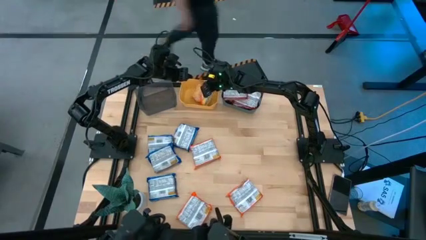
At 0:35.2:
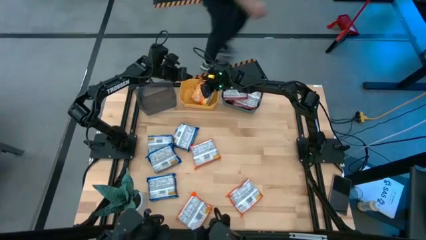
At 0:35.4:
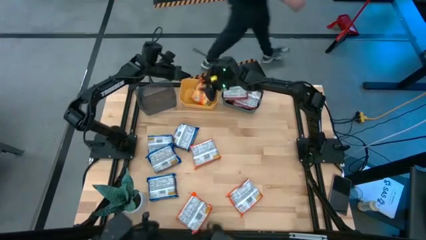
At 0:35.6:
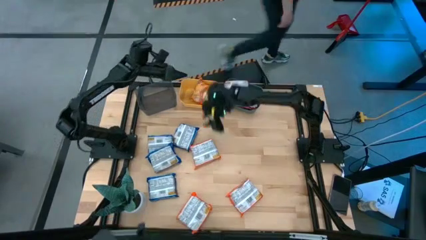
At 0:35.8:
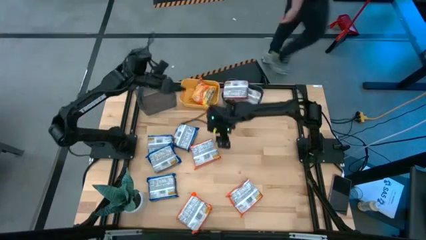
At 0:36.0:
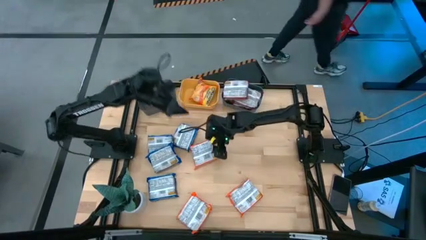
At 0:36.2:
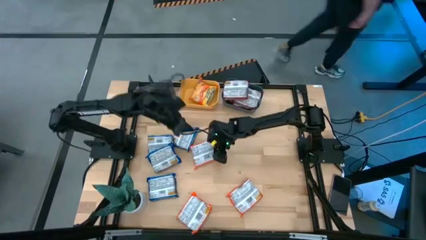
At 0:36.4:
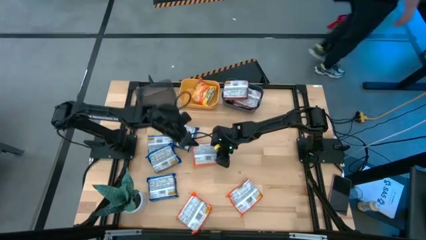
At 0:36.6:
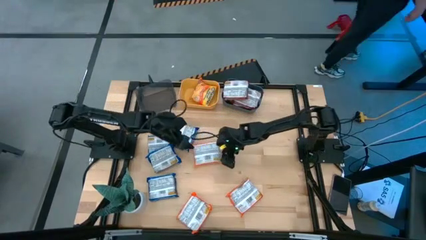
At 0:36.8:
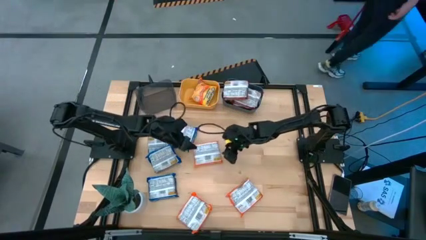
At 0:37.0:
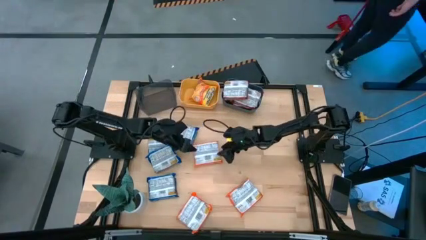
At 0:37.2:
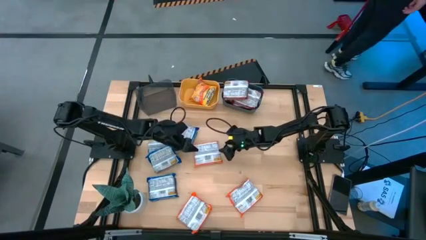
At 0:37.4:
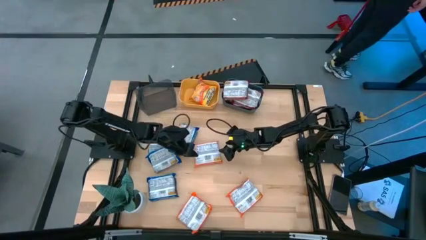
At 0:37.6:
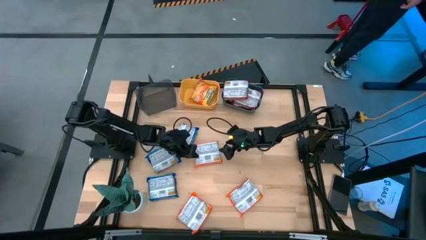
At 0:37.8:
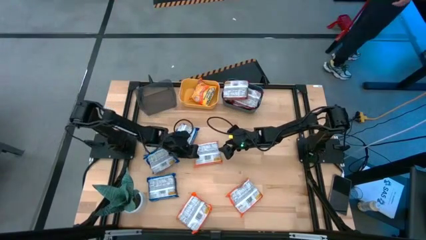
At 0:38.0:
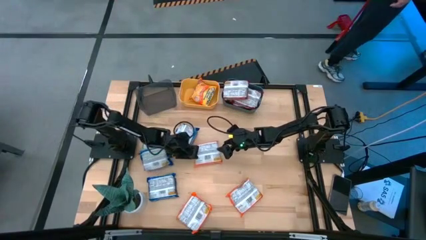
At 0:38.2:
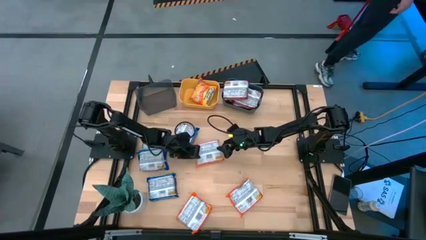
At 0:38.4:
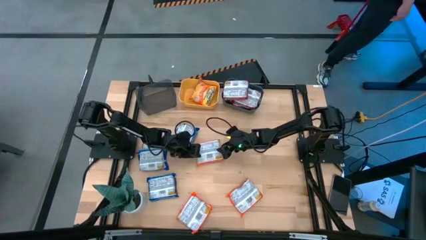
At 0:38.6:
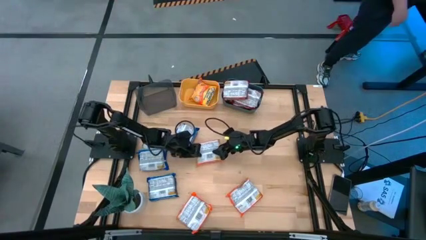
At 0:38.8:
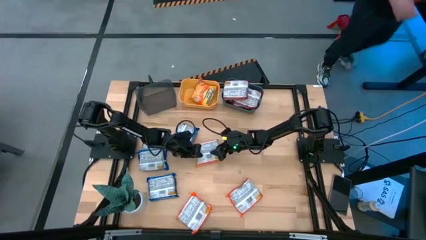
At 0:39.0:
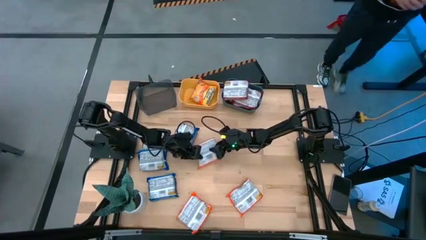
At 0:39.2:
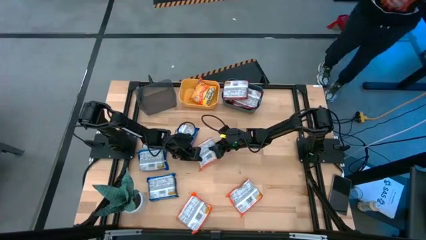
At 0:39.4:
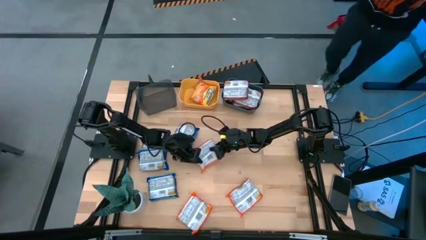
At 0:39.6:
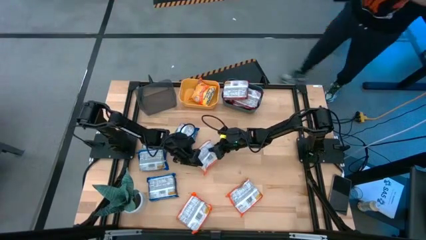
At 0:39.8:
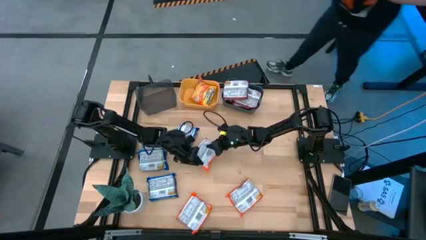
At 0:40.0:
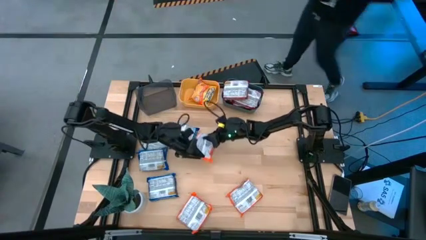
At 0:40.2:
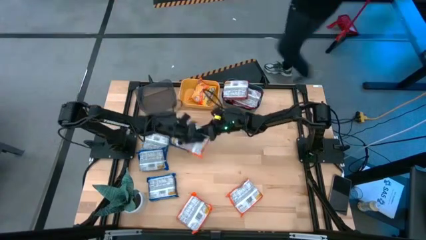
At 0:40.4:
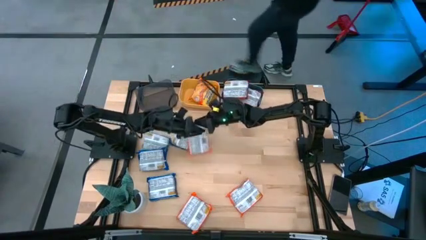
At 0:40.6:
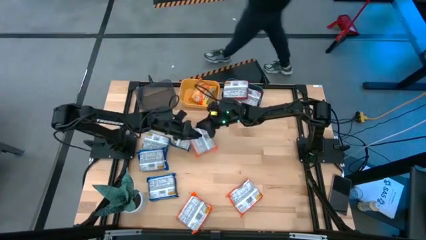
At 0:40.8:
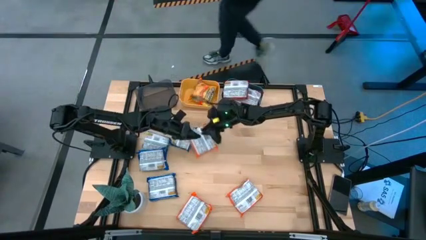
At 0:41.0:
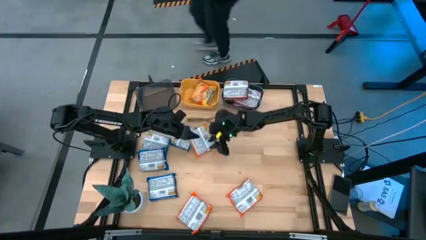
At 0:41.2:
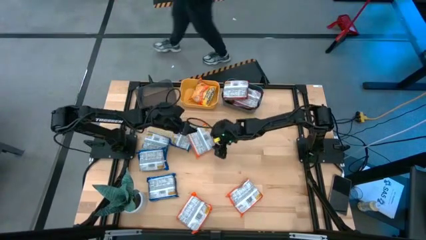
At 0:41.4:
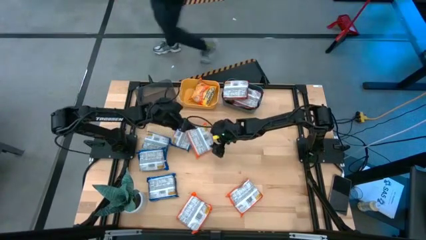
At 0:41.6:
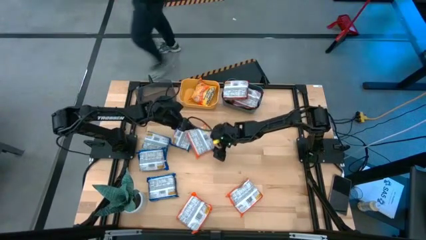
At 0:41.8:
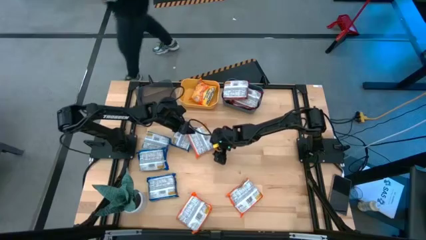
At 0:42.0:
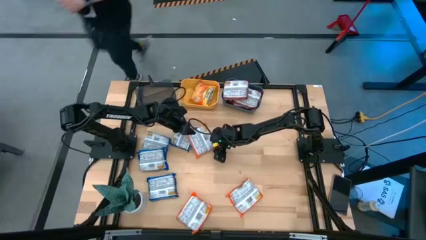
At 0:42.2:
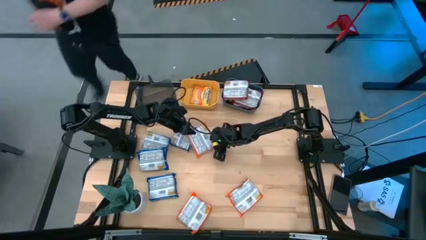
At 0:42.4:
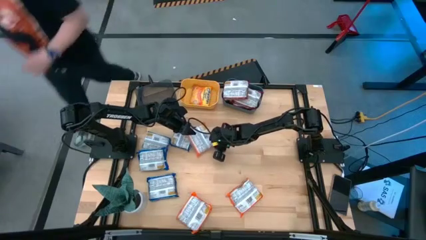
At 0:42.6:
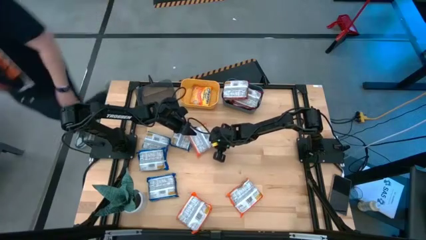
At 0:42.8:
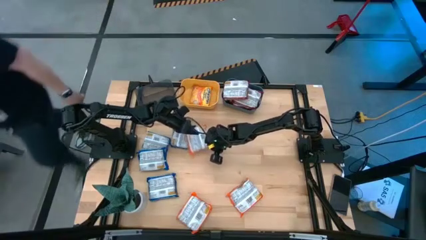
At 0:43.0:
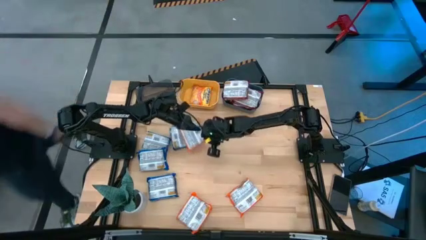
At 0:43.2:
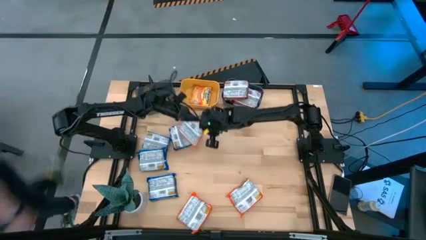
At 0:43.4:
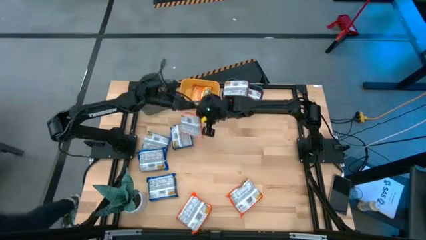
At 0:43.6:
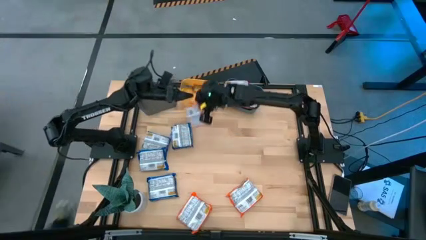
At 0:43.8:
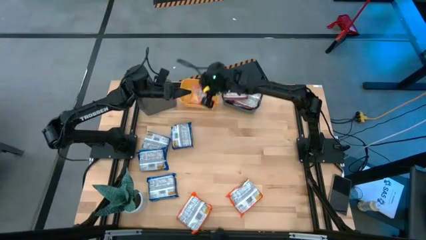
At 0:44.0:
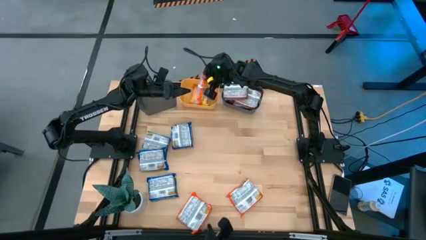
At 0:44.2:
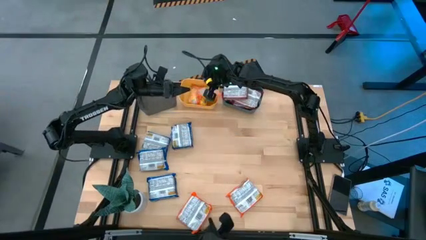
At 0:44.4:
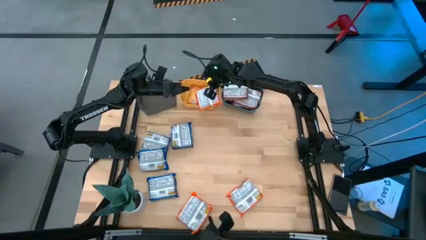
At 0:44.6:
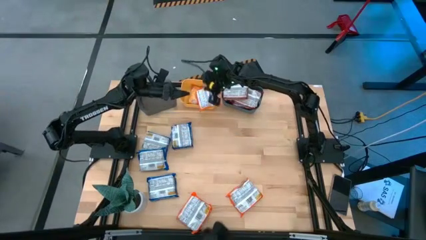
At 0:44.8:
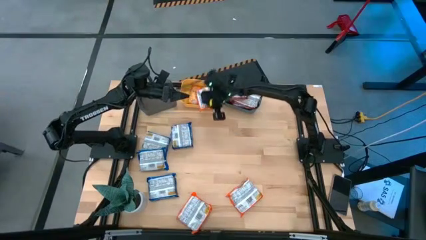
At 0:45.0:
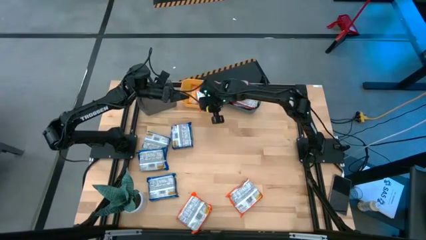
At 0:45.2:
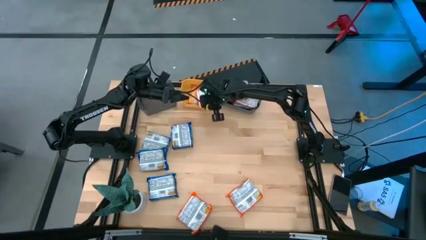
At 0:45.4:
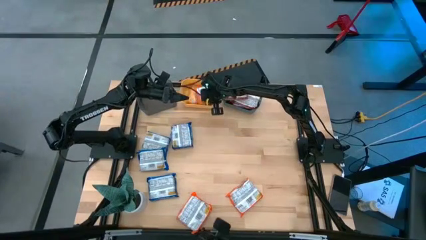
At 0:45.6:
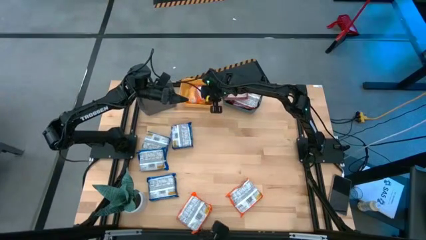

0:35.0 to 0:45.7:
Task: Sort Maruchan noodles
Put the orange noodle pack into the yellow bin

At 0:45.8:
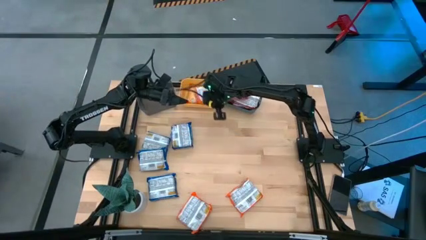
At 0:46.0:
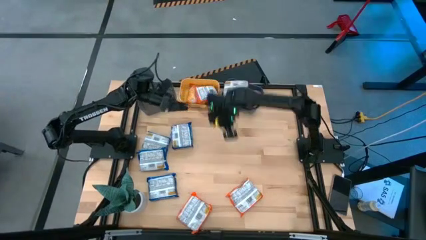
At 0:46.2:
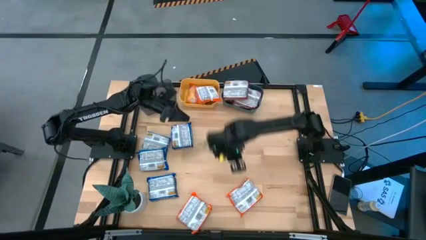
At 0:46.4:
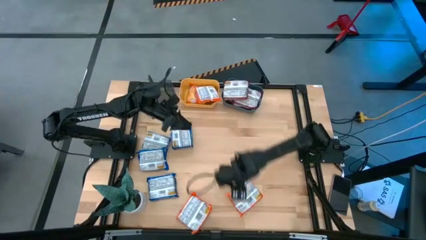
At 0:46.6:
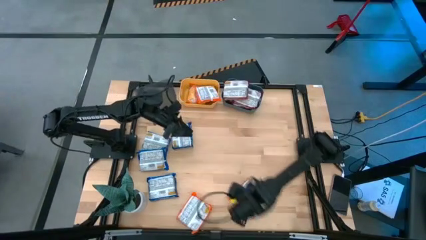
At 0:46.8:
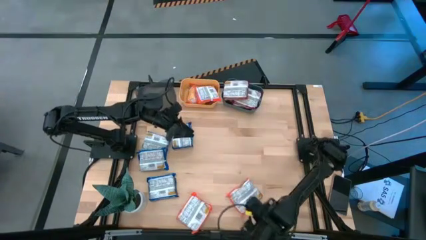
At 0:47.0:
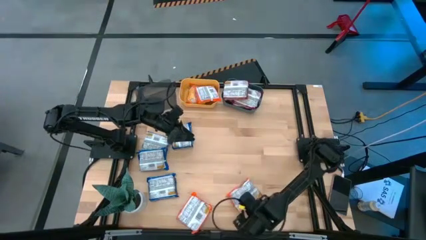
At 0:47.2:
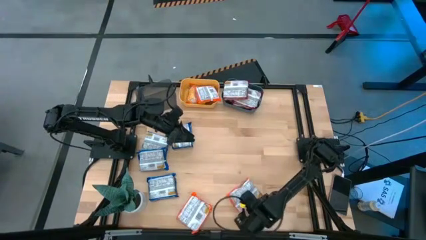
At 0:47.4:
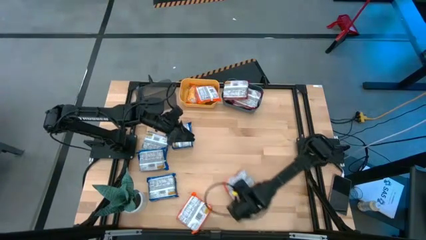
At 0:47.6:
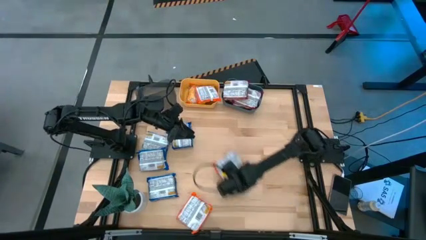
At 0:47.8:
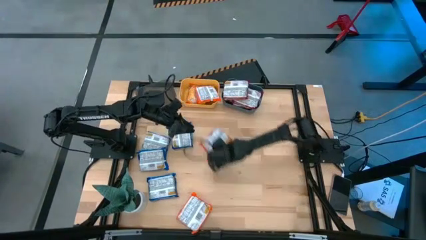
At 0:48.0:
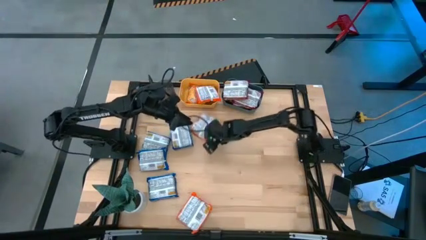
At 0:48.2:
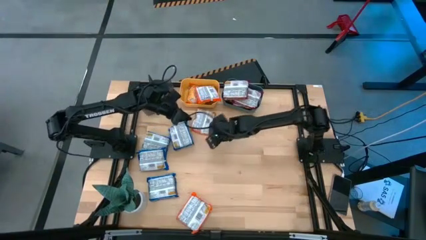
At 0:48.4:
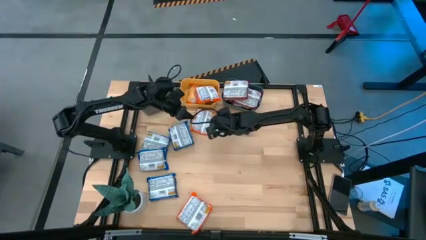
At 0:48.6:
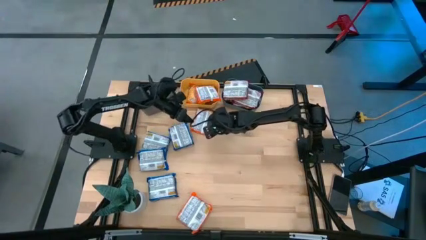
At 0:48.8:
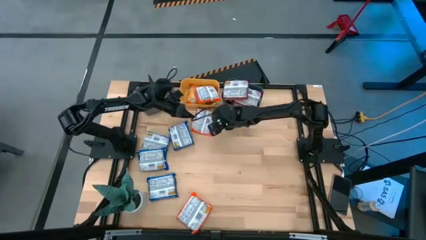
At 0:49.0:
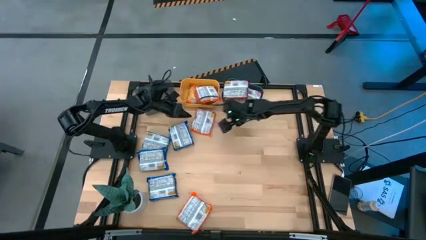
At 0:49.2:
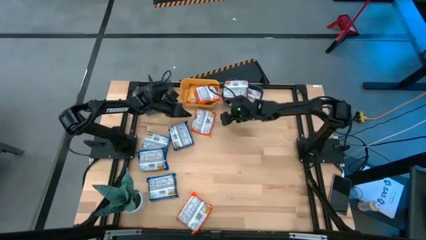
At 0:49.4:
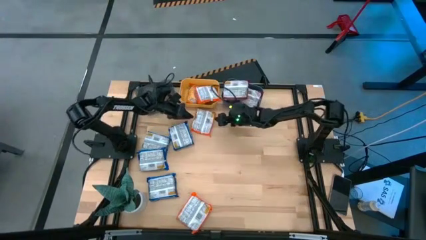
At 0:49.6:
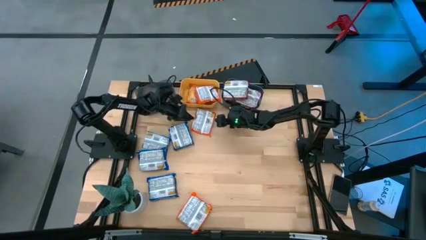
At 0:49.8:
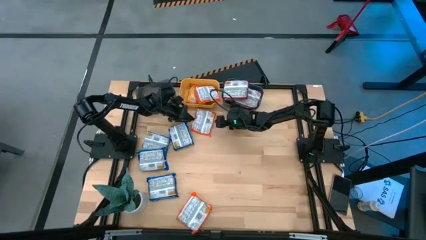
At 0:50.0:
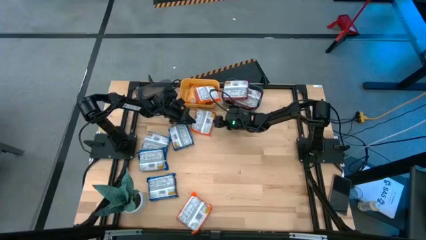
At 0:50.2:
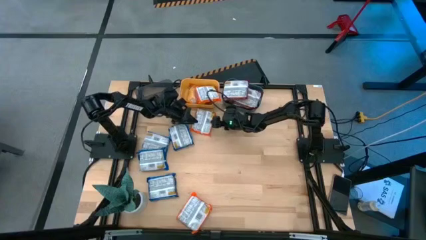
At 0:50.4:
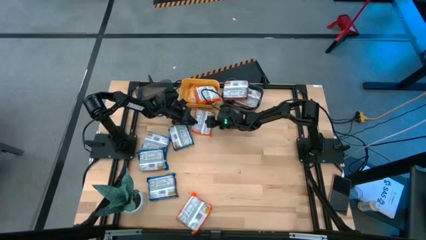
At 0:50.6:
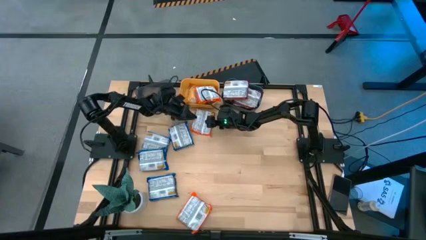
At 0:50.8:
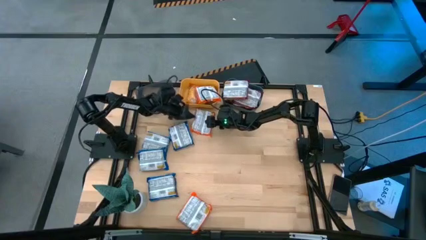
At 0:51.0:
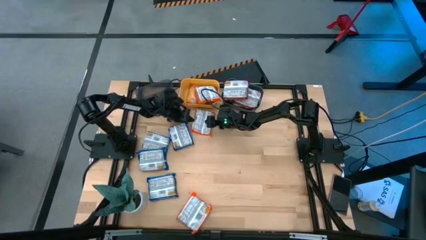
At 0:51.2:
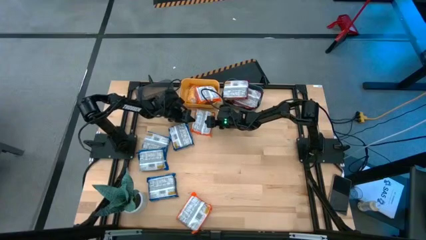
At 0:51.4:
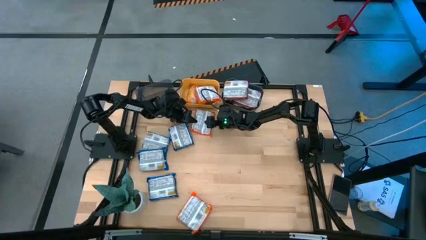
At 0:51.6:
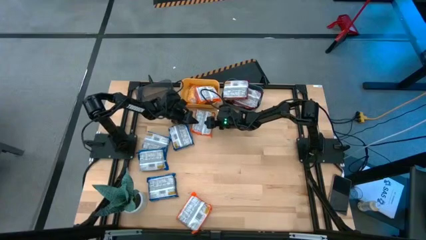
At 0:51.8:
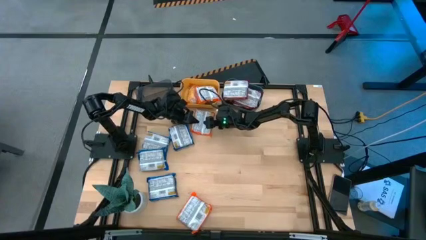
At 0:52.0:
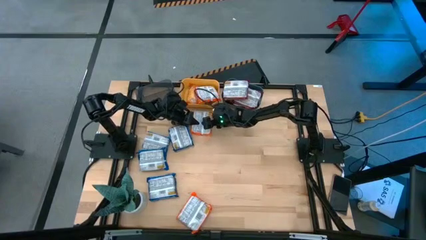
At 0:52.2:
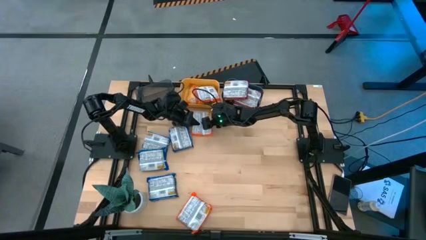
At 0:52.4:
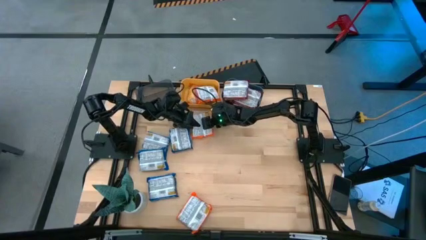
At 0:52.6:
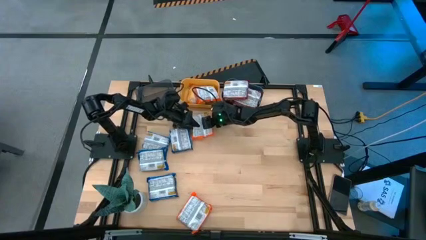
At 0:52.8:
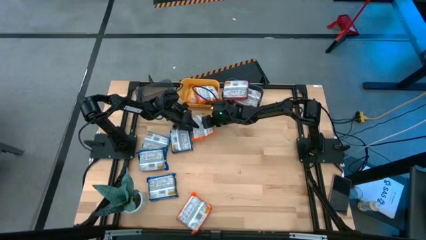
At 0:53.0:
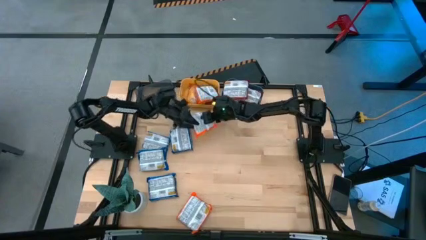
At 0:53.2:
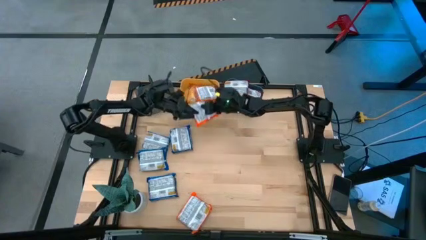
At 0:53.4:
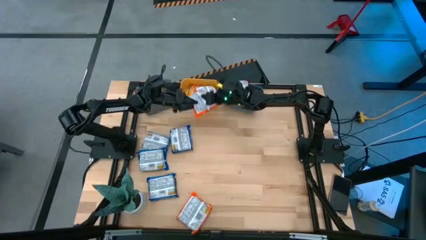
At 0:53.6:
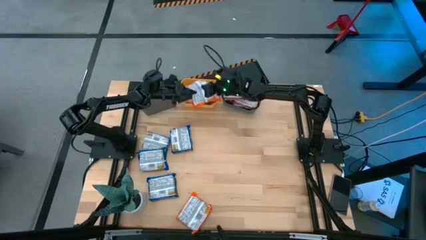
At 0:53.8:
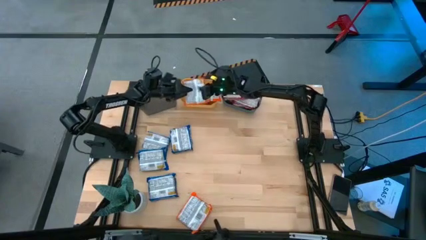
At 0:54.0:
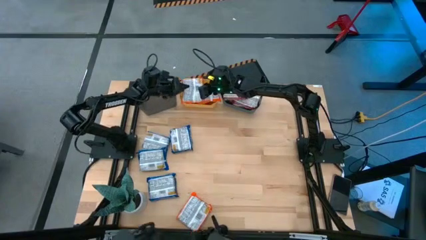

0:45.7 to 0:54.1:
Put the orange noodle pack into the yellow bin
